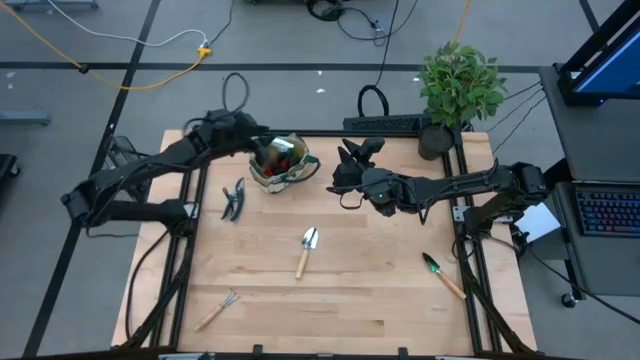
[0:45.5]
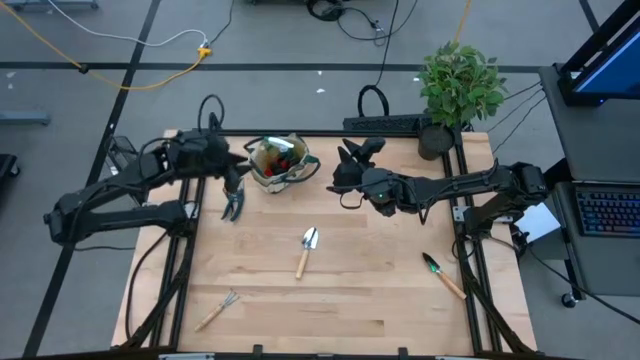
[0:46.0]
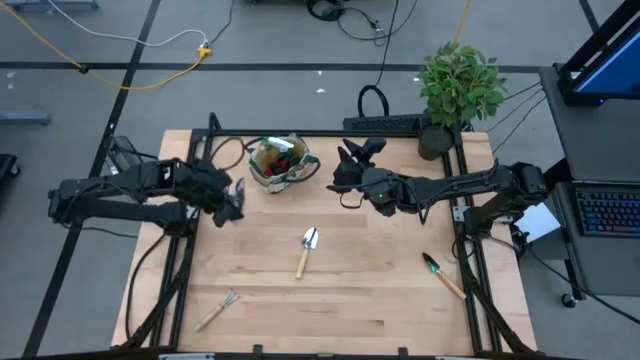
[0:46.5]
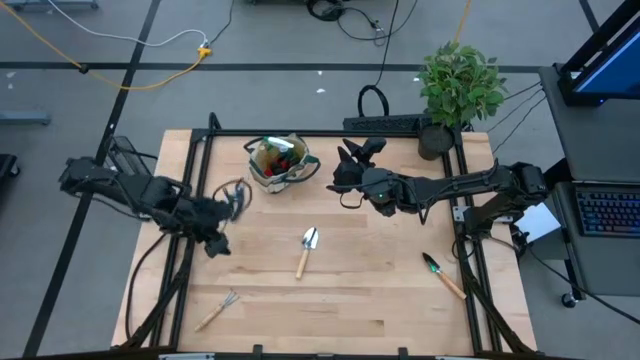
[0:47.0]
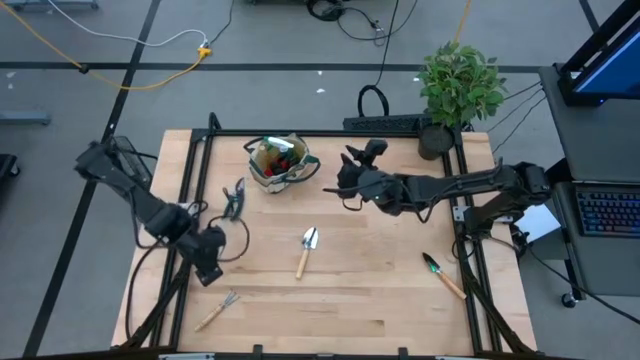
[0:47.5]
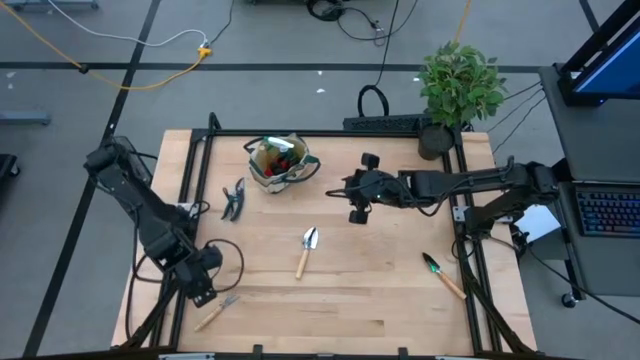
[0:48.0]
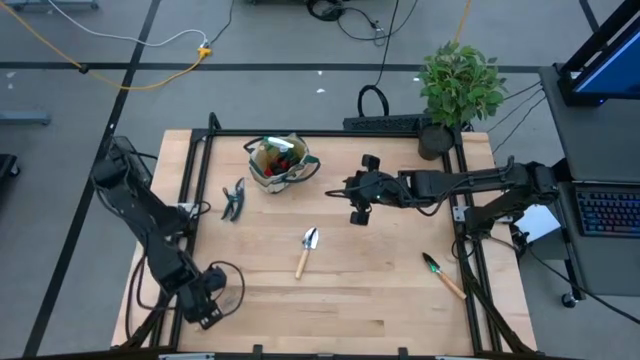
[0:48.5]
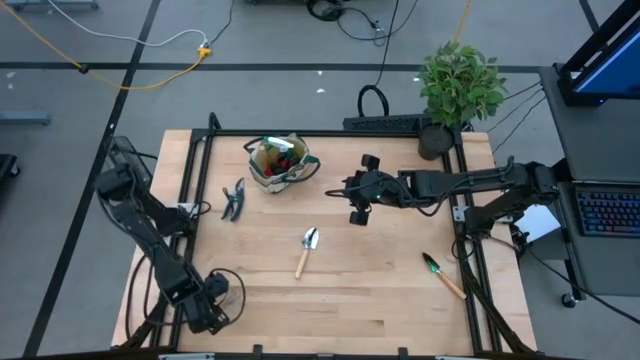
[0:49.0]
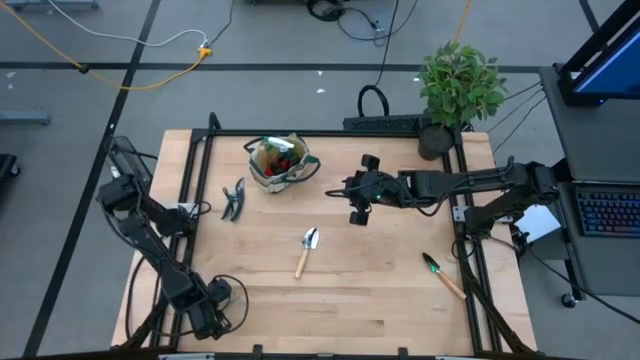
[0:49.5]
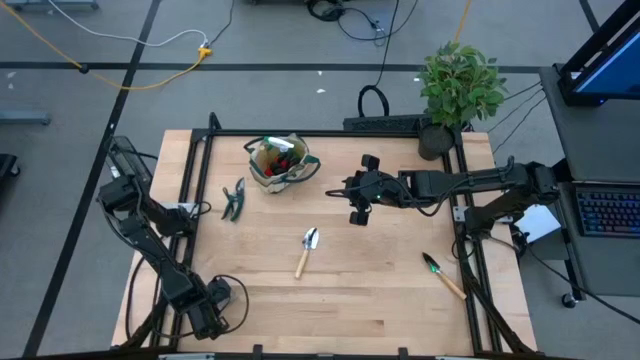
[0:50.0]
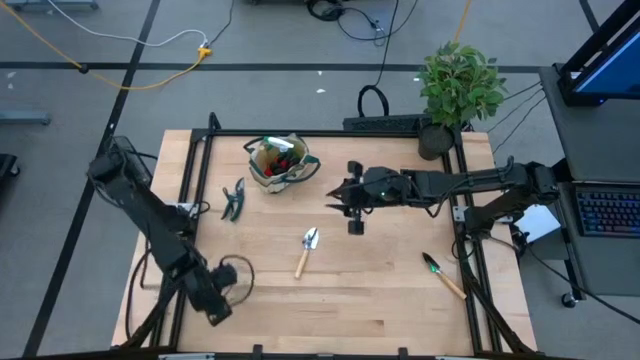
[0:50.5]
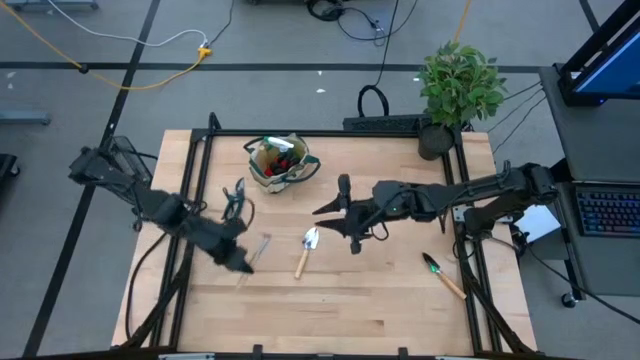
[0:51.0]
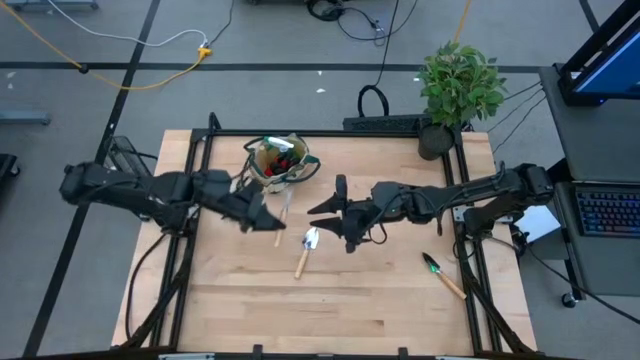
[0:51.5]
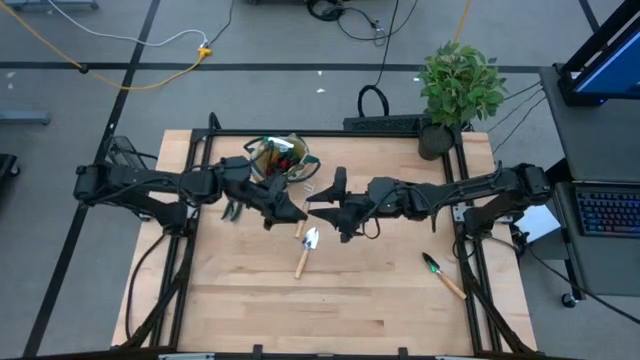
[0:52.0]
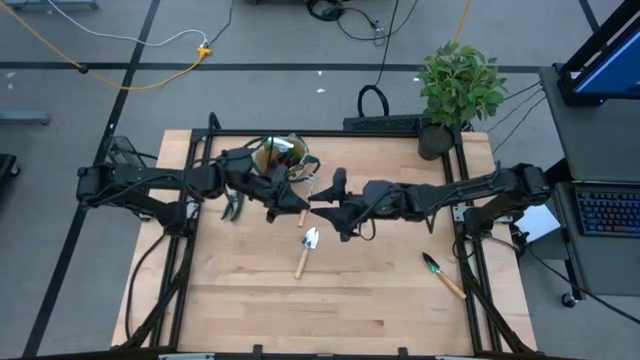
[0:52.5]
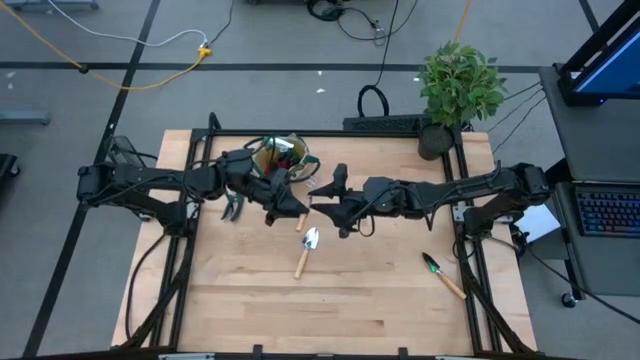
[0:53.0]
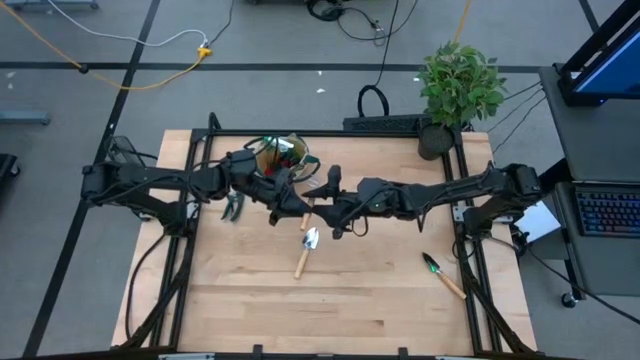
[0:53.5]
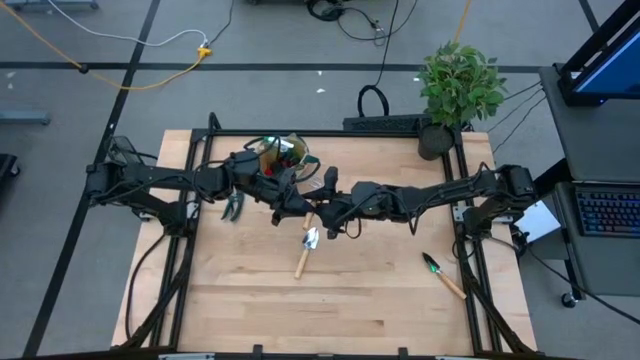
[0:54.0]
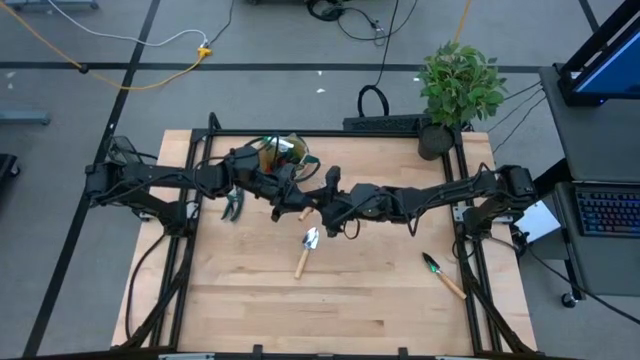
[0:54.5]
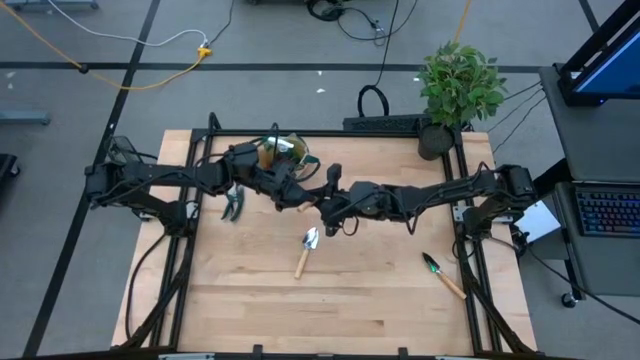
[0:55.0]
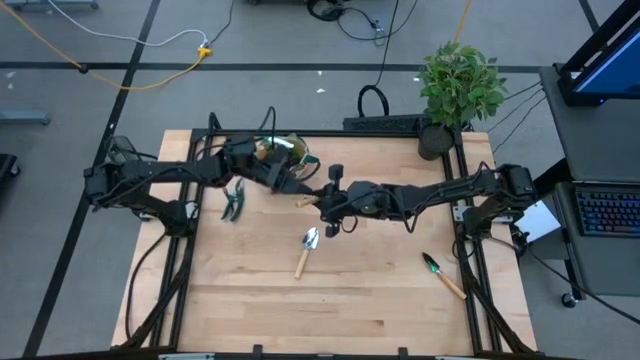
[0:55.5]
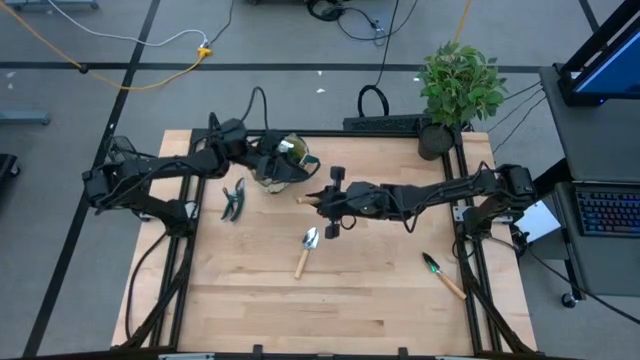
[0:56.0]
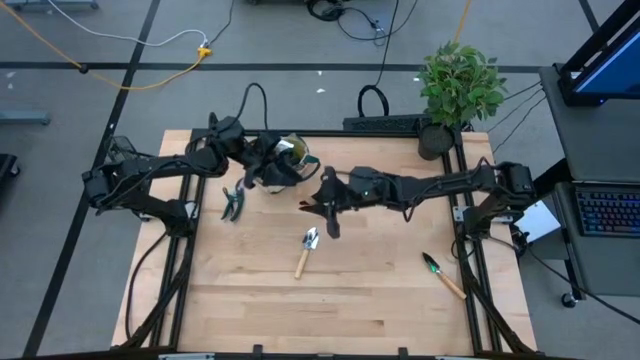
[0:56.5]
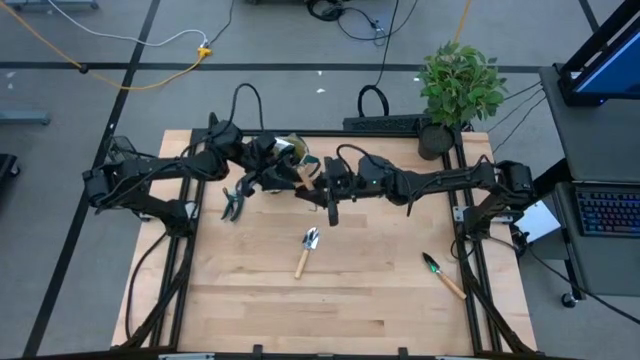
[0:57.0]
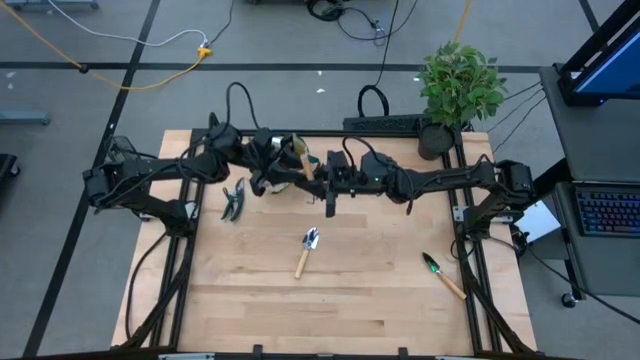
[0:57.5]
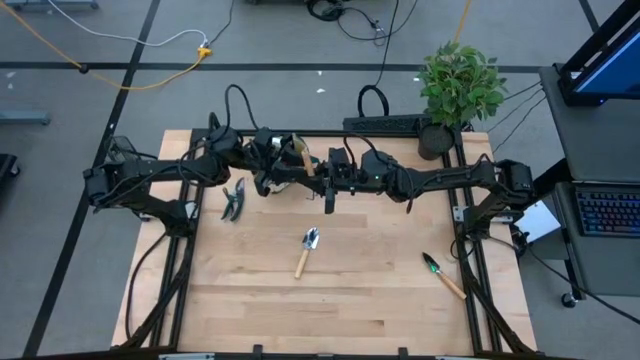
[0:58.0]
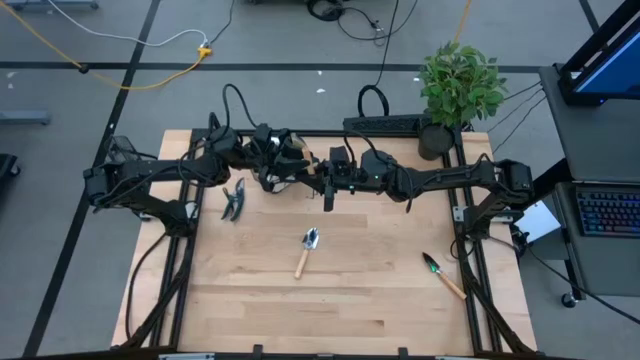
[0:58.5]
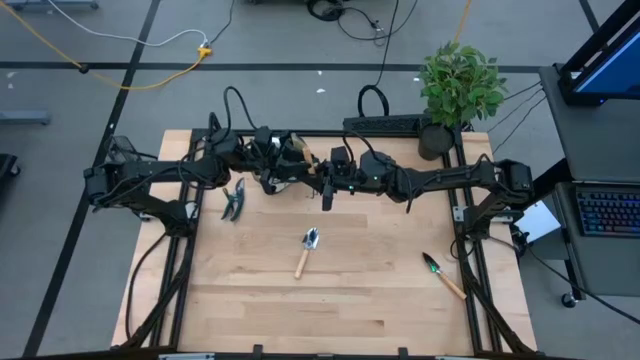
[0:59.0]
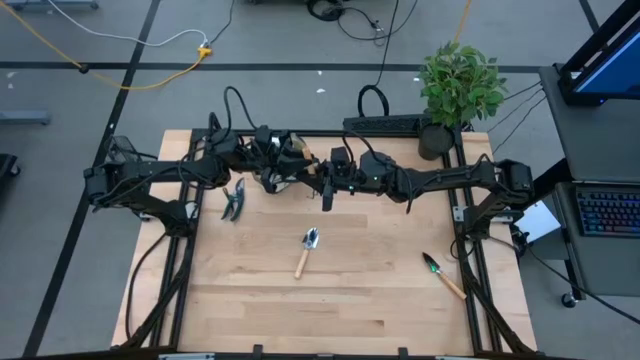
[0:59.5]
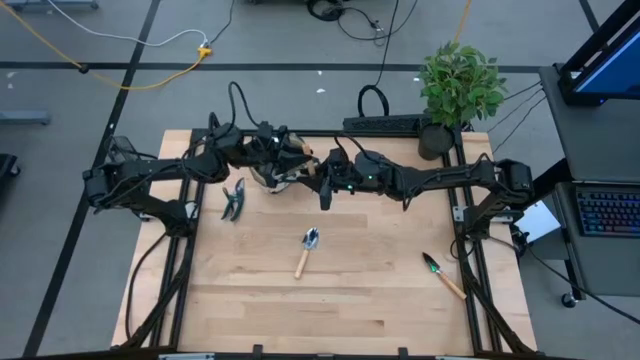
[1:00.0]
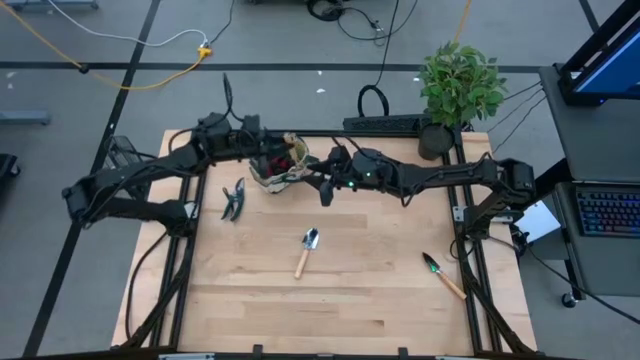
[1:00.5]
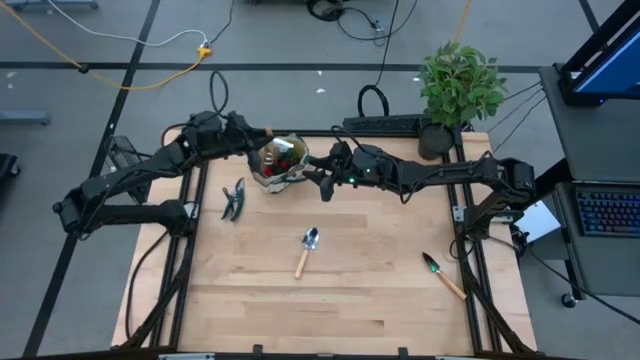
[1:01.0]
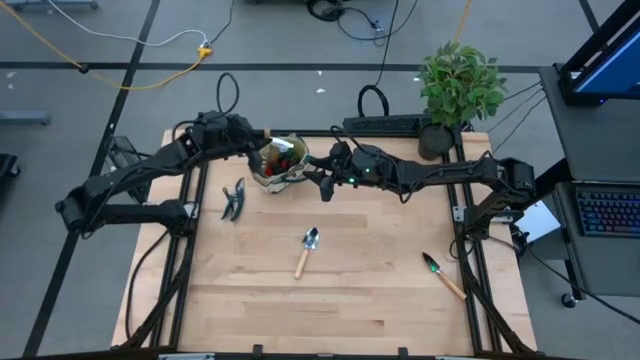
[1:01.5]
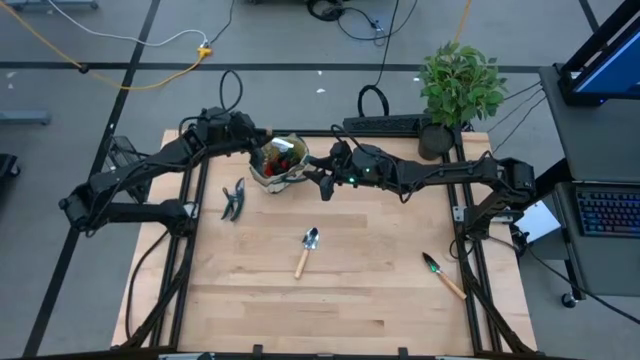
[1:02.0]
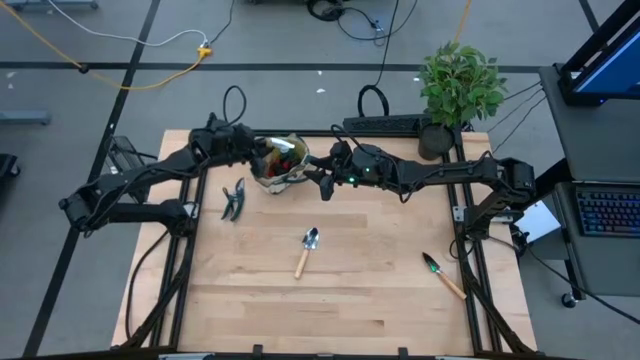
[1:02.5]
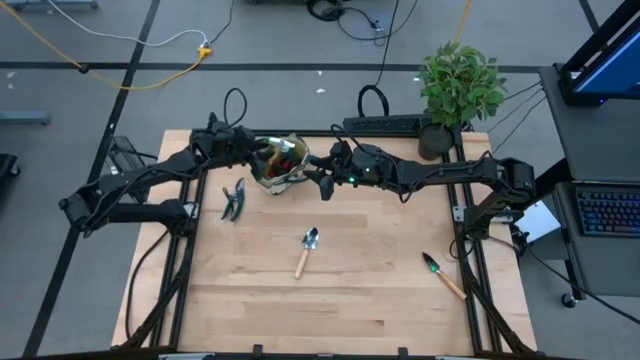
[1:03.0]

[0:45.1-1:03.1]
Task: Pick & Place Garden tools in Gardening bag
Put the hand rake into the gardening bag

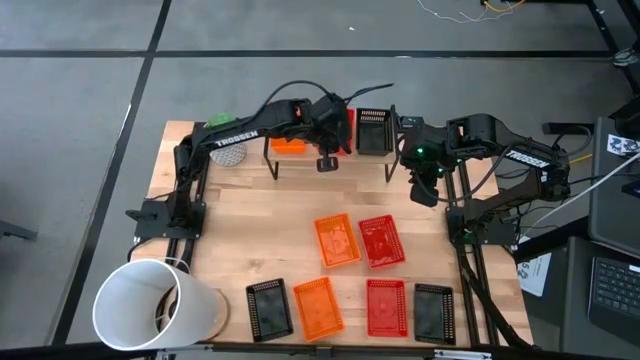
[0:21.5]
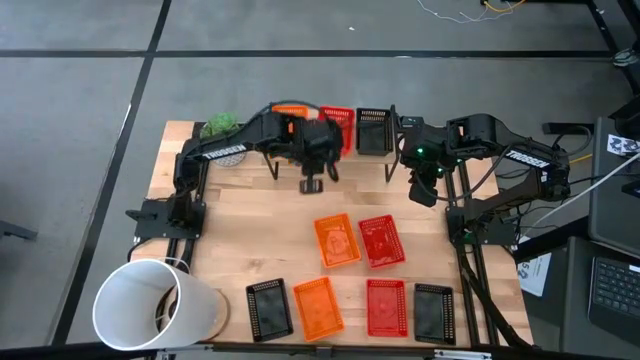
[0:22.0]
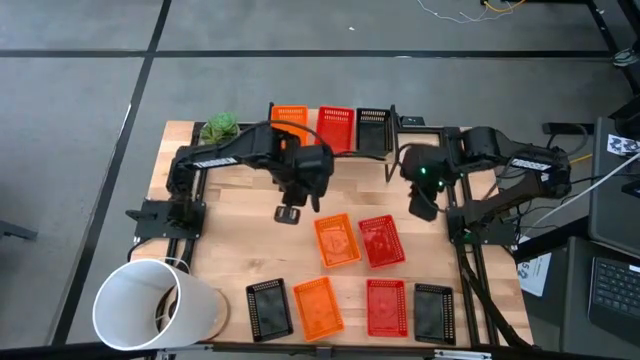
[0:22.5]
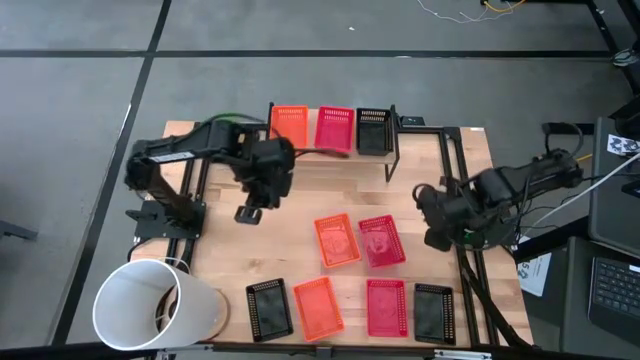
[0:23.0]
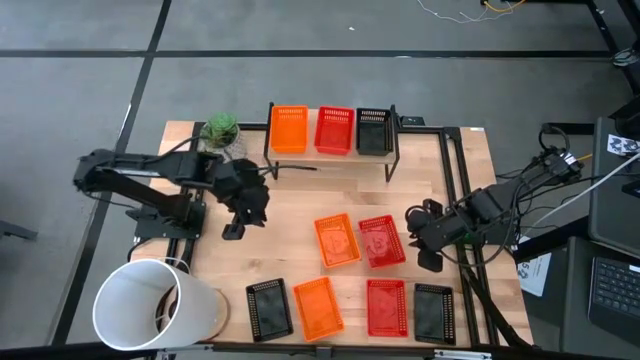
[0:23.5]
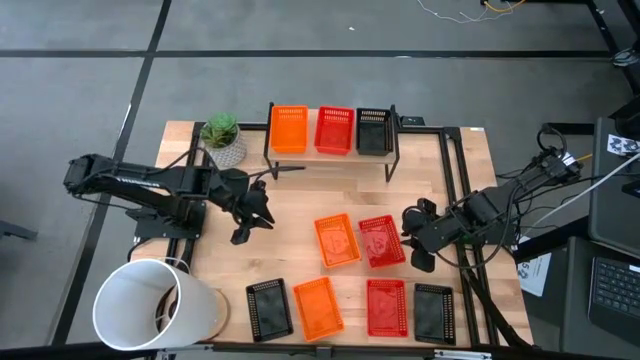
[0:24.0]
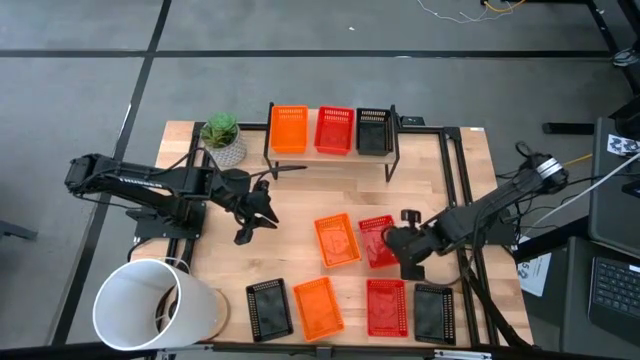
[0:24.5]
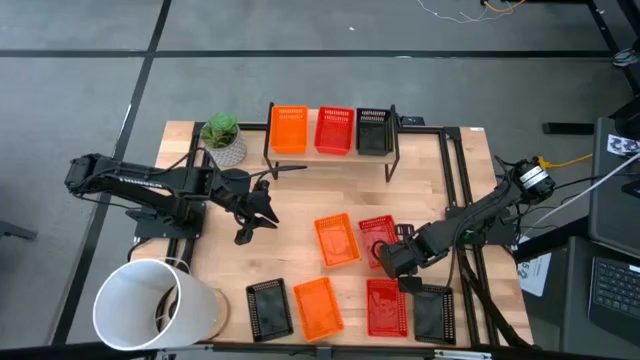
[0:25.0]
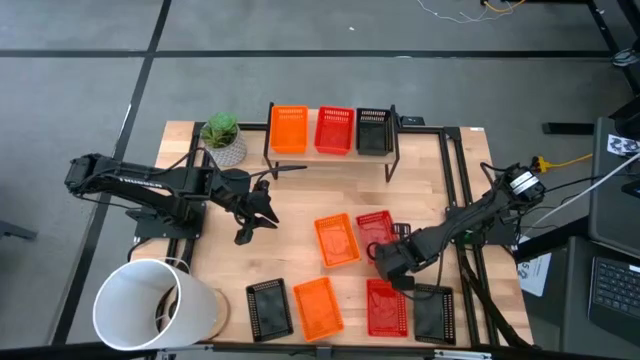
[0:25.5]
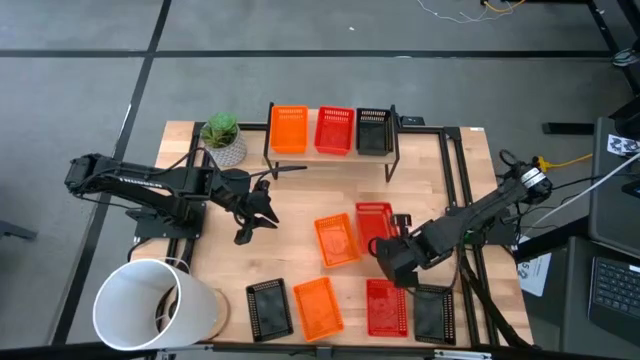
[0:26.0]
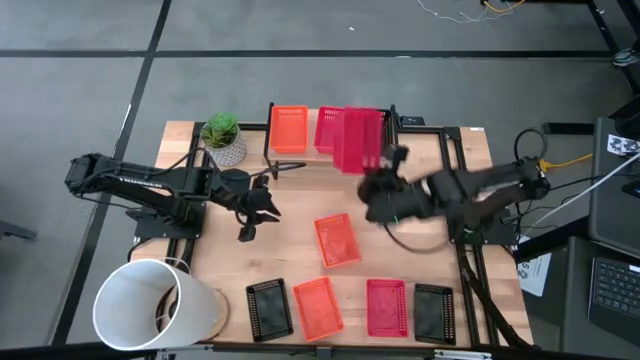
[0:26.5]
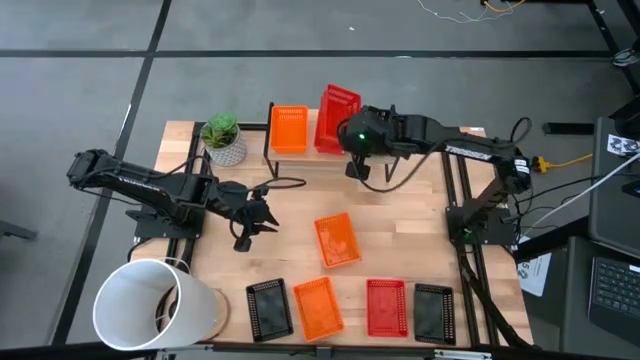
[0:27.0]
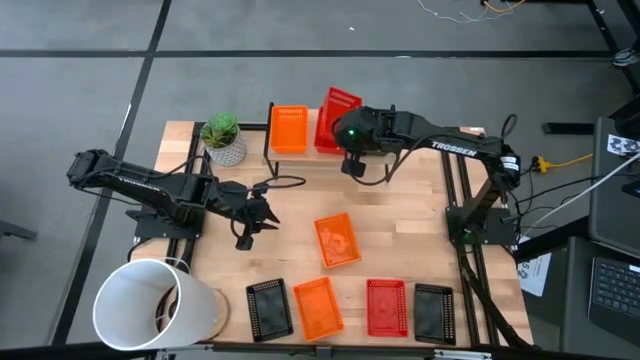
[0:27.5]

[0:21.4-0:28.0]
Task: Stack baskets on shelf by color
Stack the top red bin on top of the red bin on the shelf
